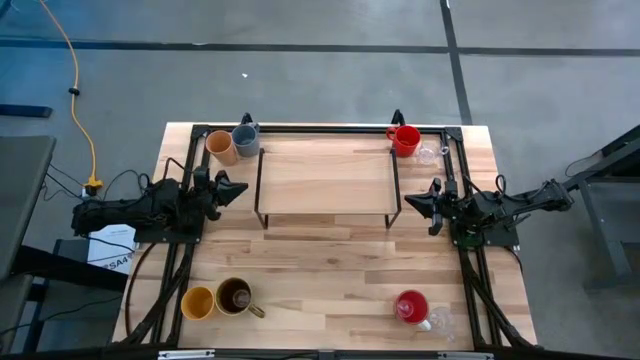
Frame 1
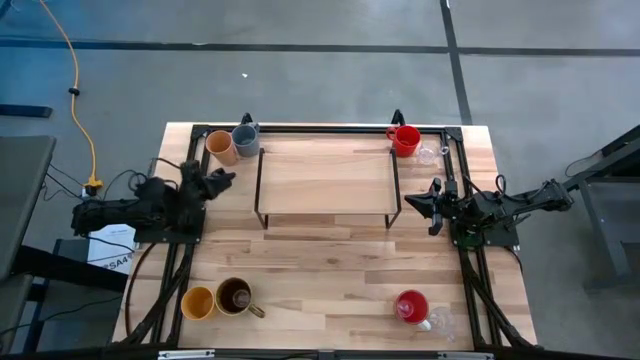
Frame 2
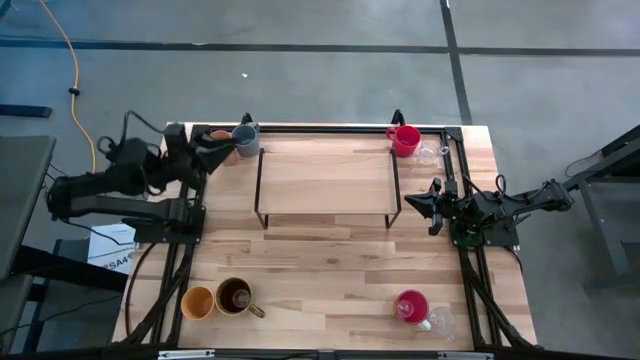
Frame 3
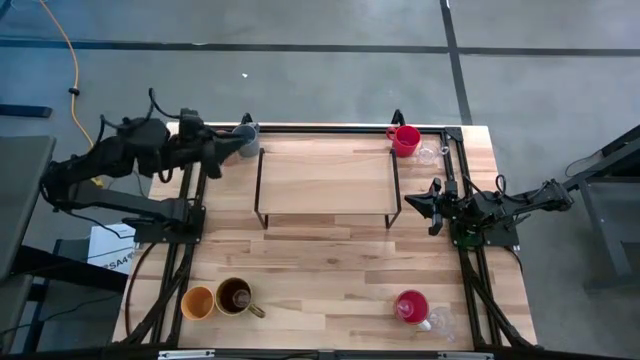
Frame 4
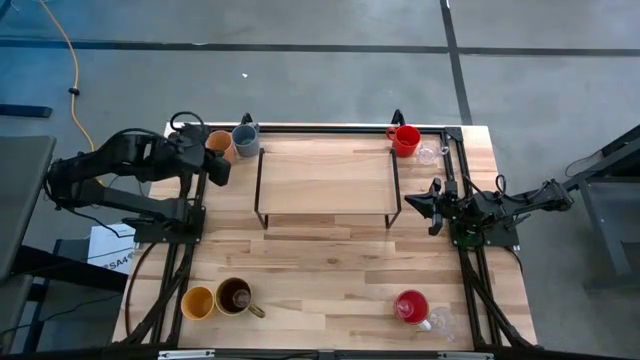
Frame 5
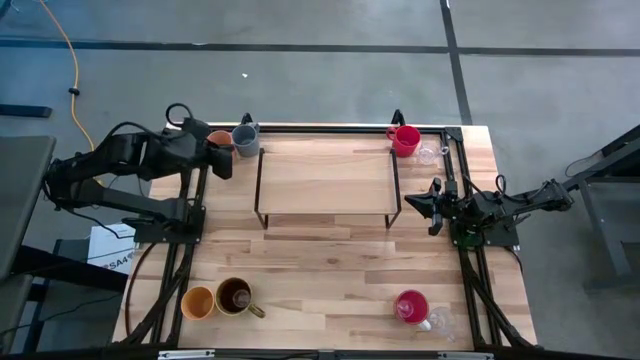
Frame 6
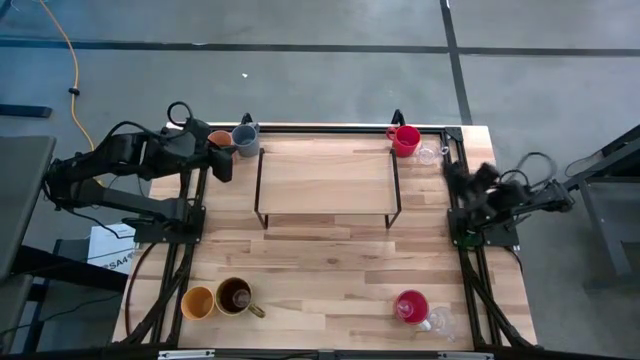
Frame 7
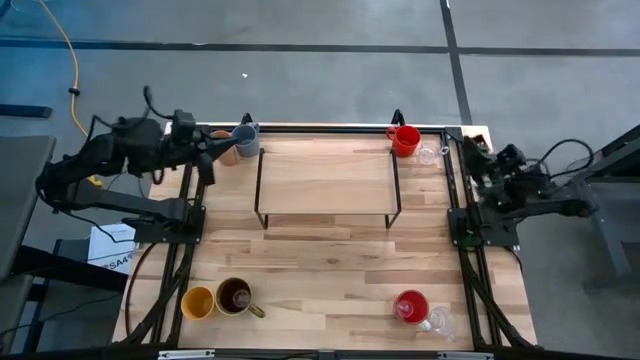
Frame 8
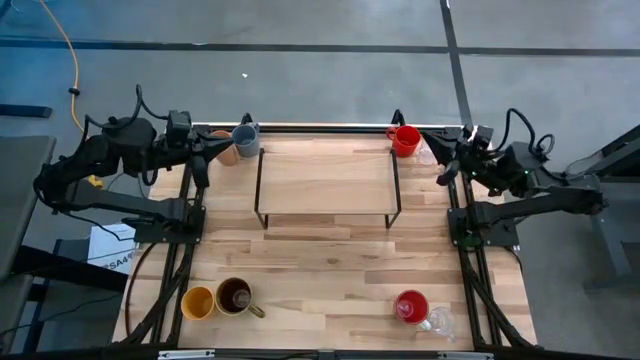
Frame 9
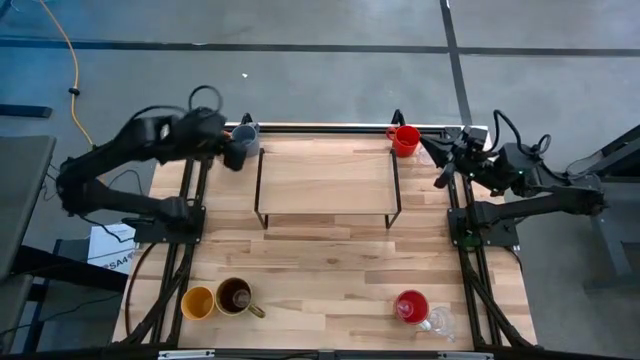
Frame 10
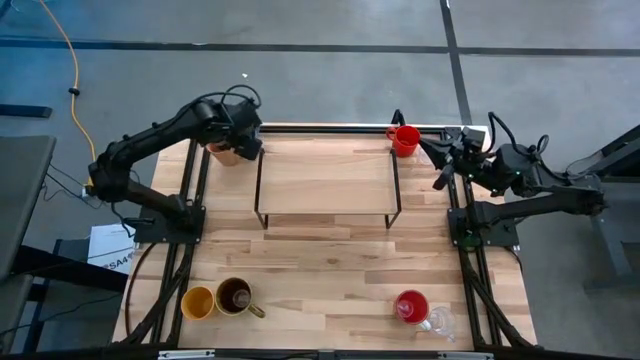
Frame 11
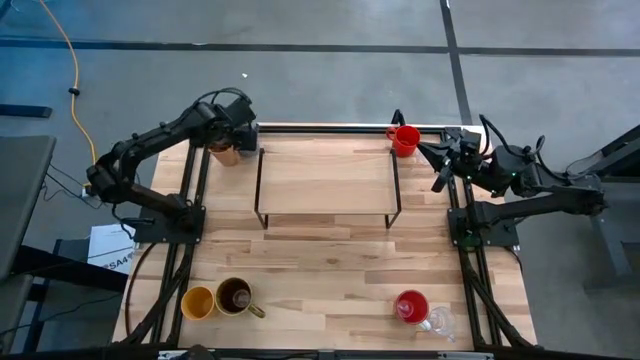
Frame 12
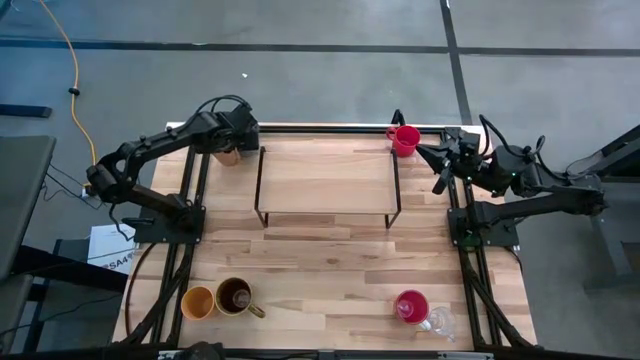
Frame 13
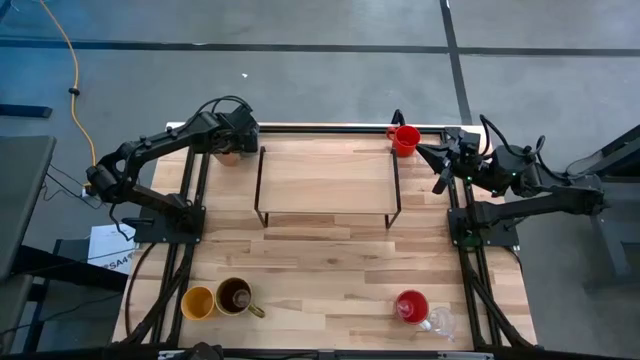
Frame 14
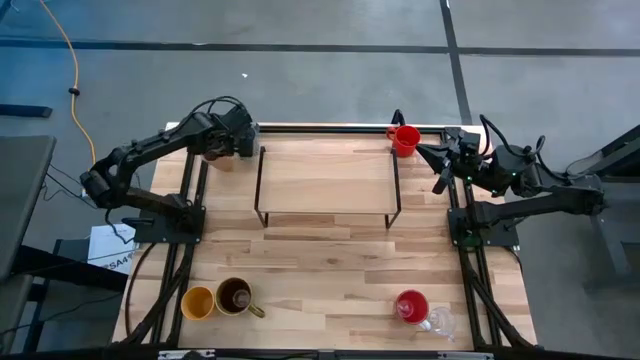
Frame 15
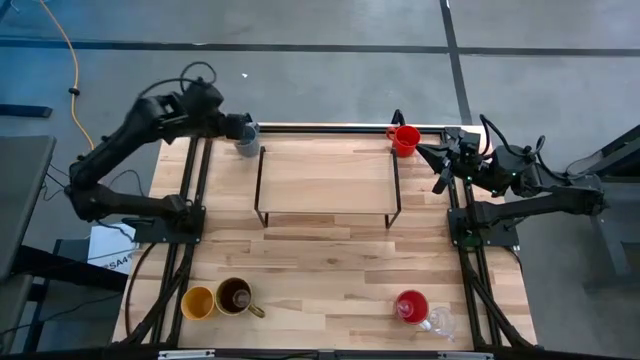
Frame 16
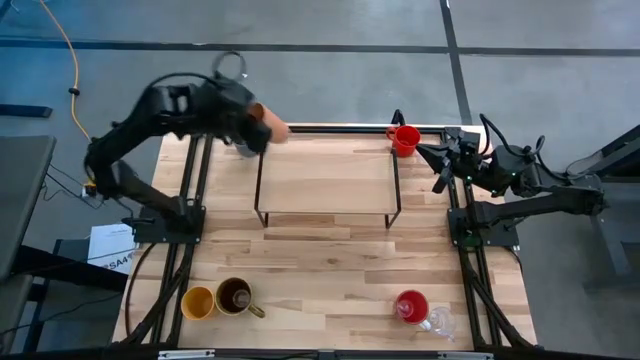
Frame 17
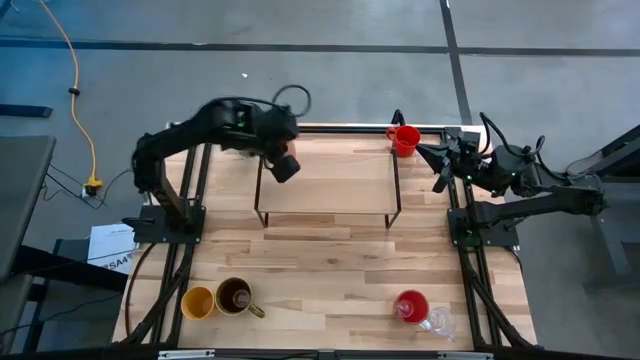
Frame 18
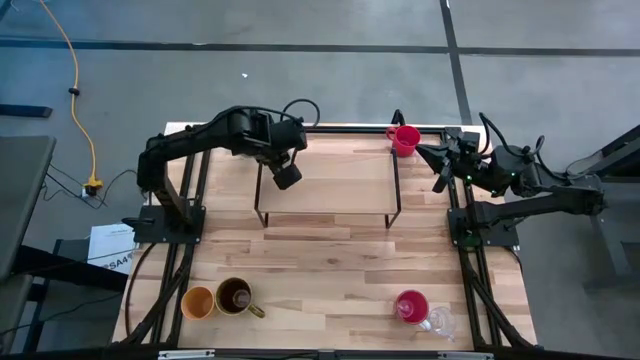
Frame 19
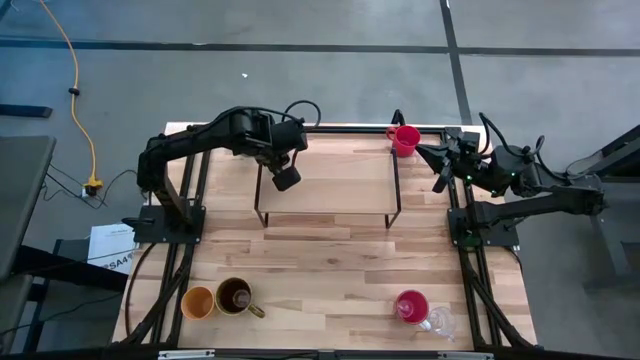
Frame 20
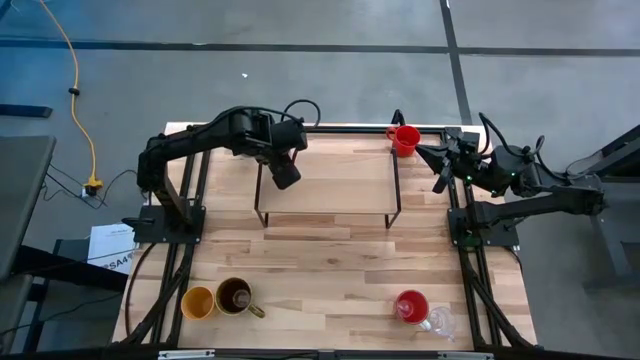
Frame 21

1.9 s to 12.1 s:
Task: Stack small to large cups/mugs on shelf
Put the brown cup on the shelf

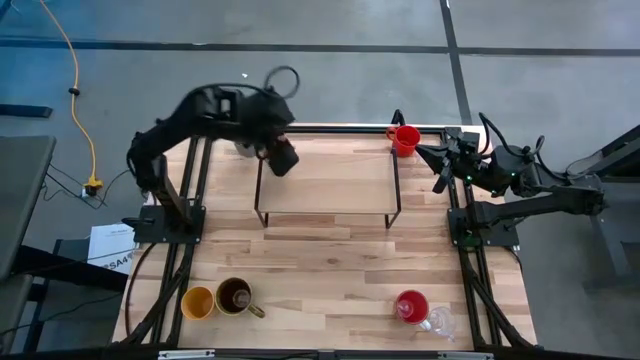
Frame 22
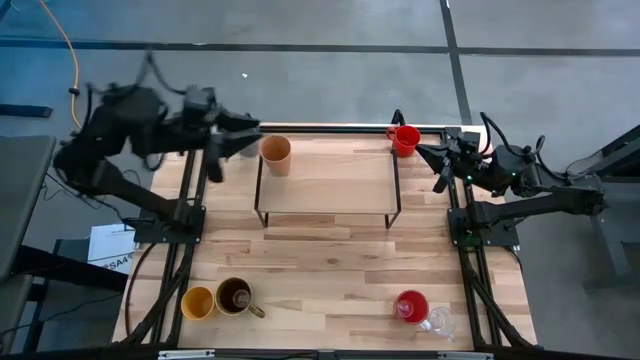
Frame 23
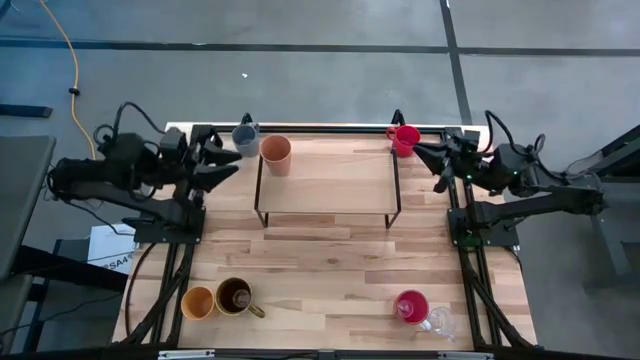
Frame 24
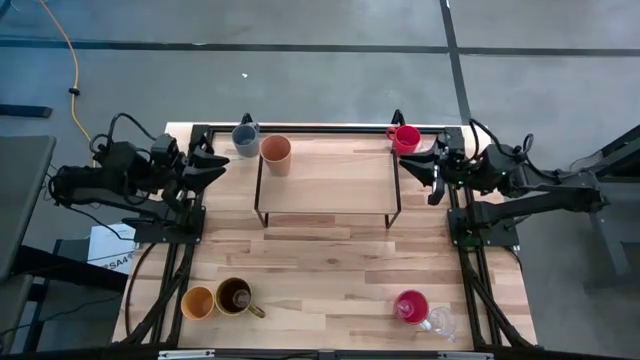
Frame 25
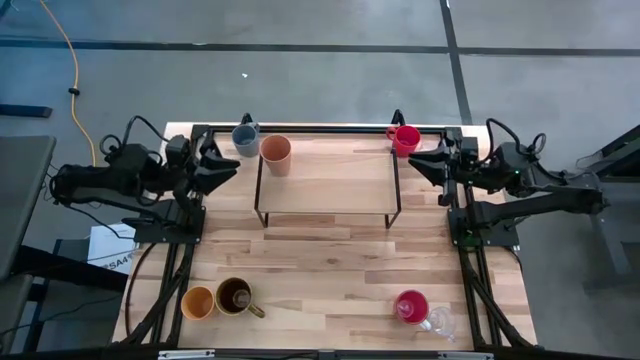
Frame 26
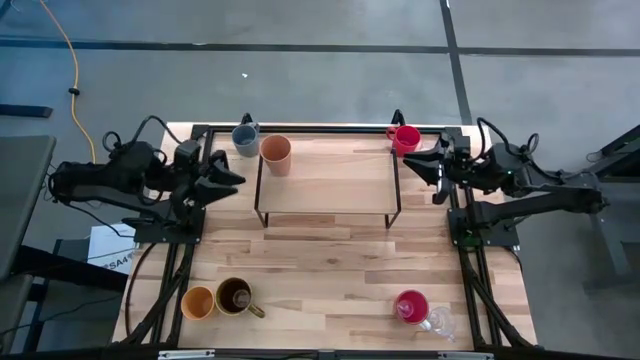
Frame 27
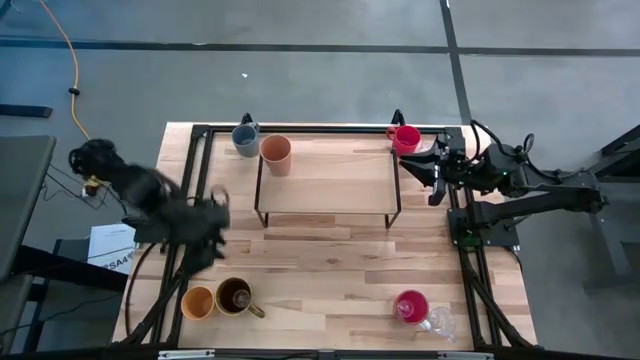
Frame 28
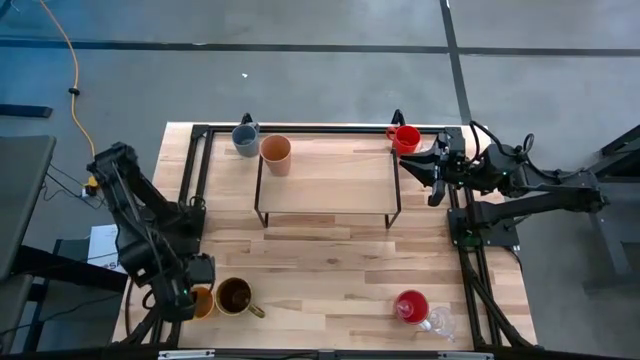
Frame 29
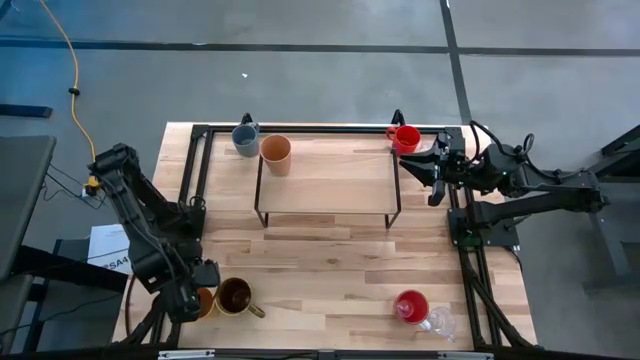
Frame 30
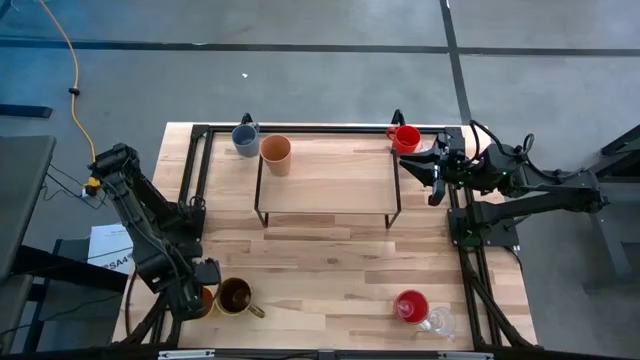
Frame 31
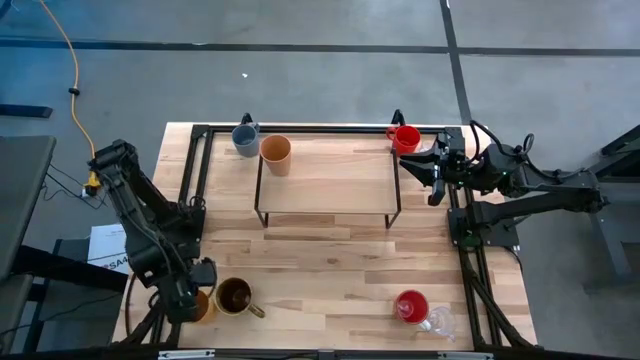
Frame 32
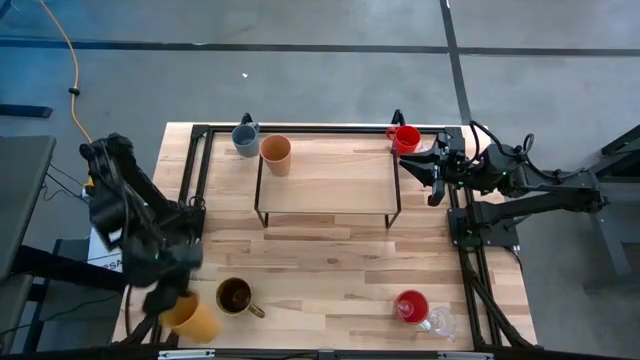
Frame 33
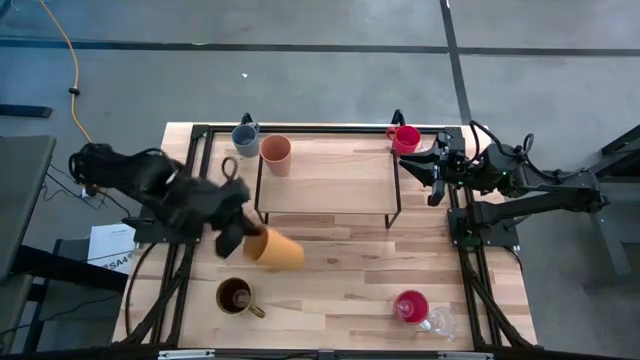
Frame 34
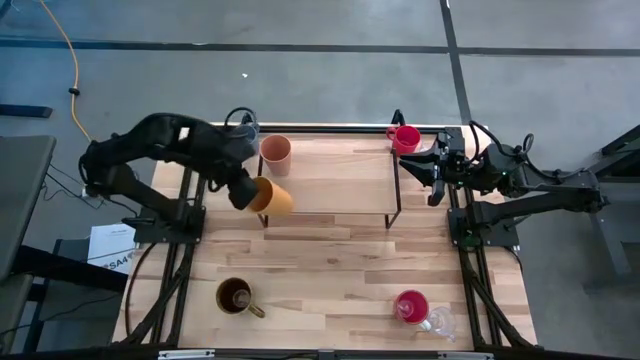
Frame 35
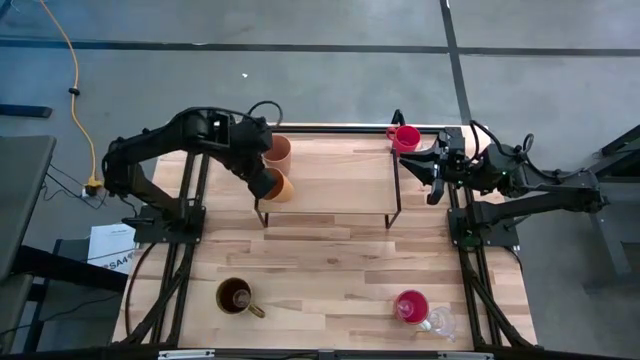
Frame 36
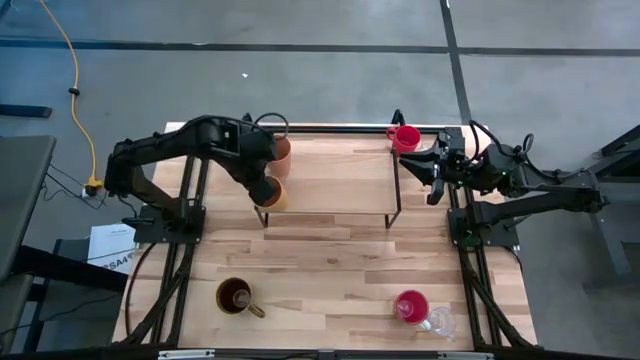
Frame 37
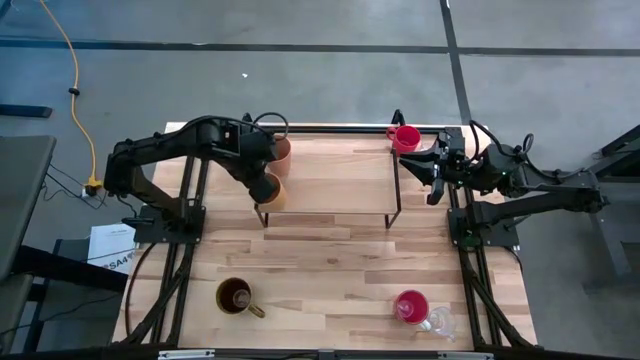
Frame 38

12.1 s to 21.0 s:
Put the yellow cup on the shelf

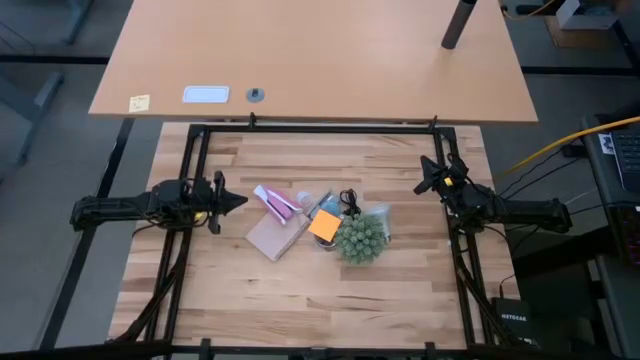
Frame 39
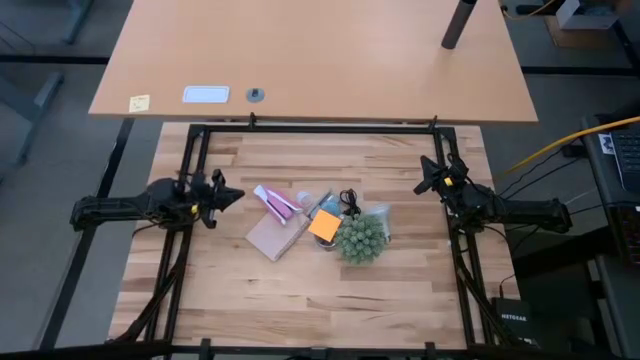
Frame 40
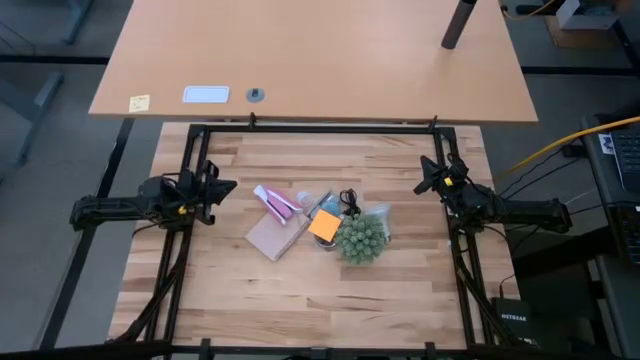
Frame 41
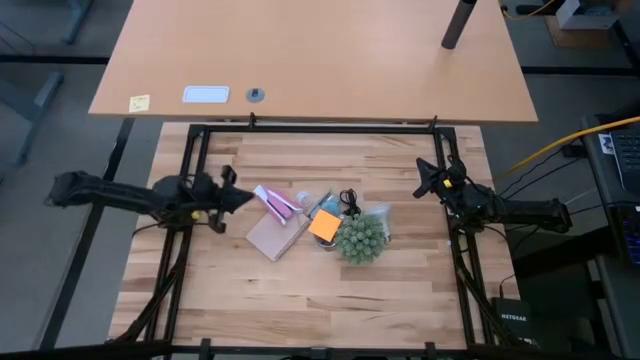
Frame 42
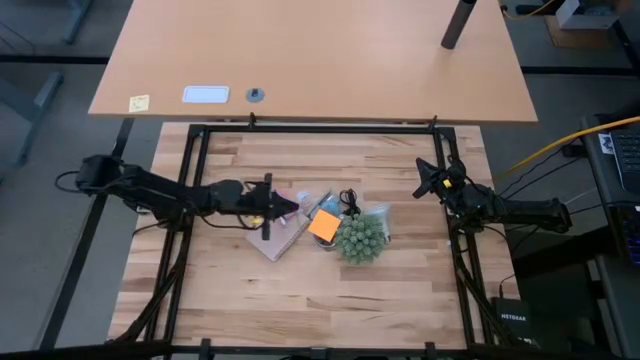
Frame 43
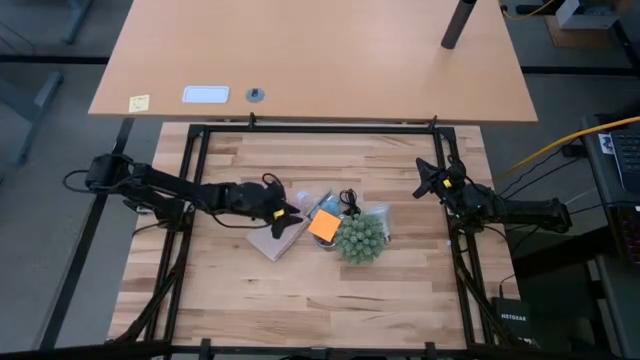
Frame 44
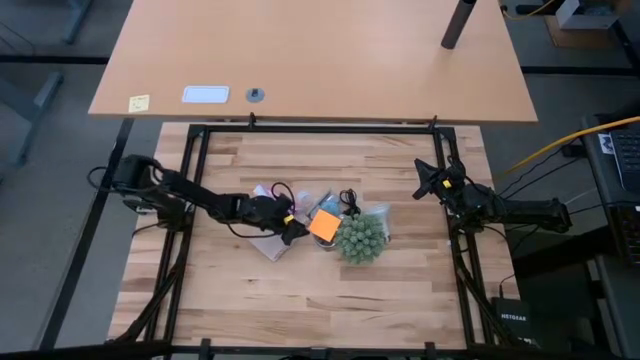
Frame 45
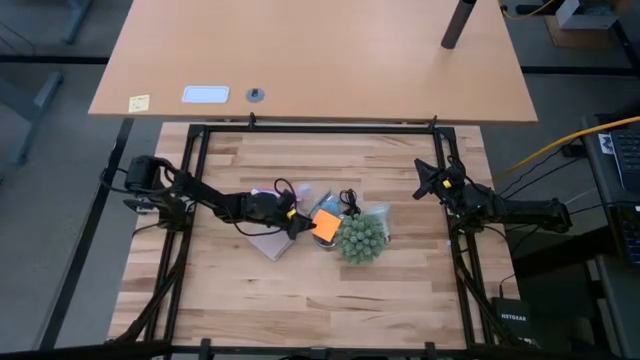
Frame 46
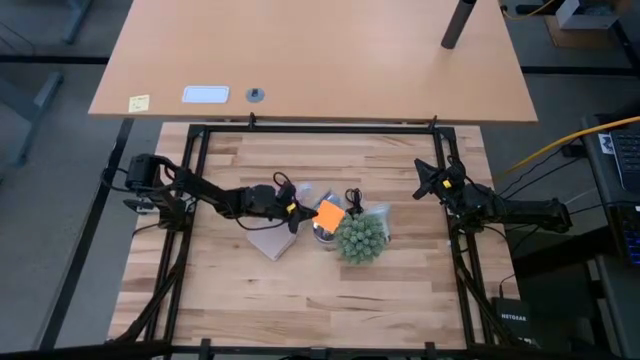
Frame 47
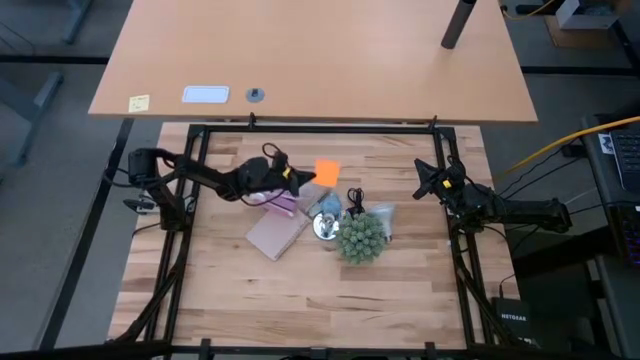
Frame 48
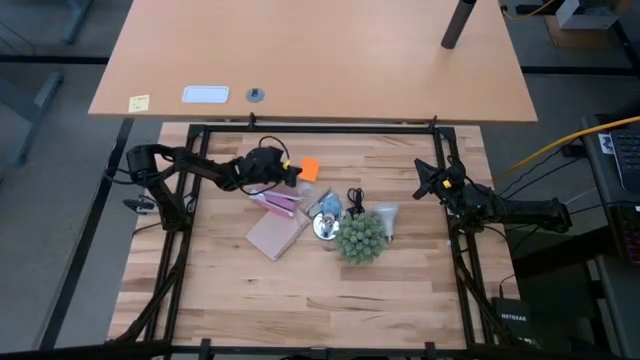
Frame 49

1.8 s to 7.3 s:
Task: Screw lightbulb
Move the orange sticky note to the top center of the table
